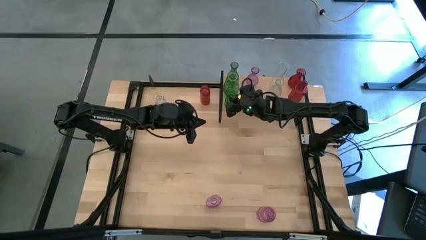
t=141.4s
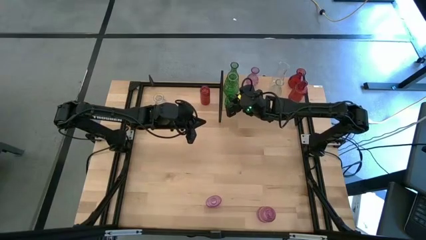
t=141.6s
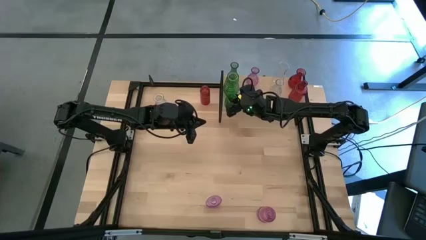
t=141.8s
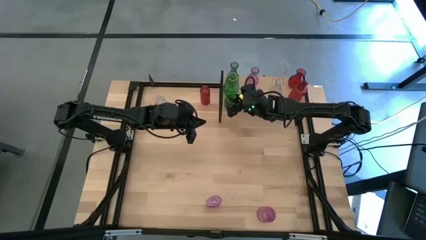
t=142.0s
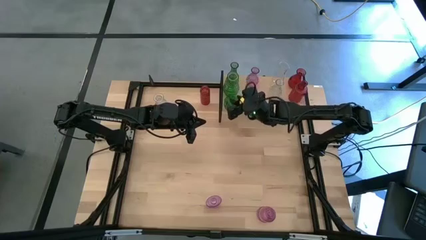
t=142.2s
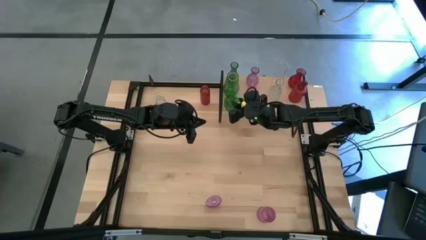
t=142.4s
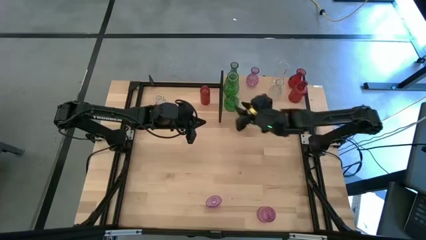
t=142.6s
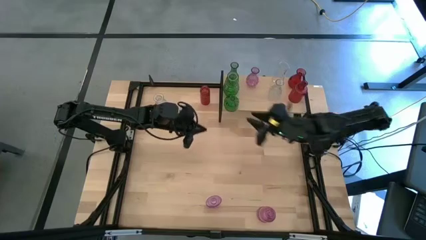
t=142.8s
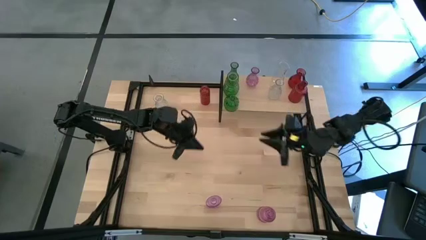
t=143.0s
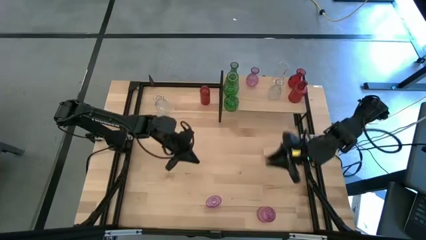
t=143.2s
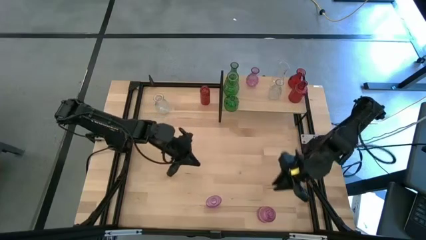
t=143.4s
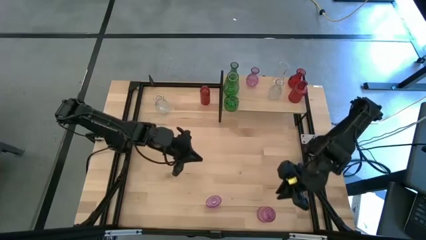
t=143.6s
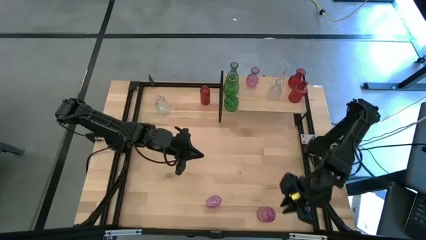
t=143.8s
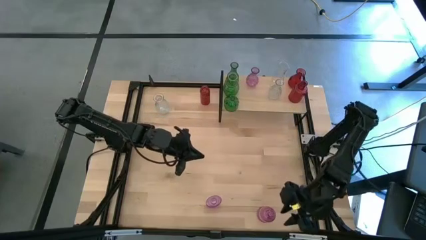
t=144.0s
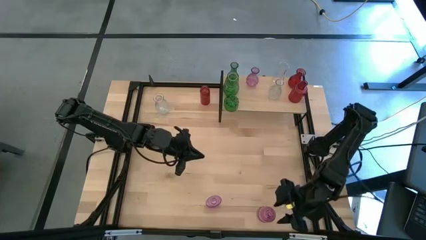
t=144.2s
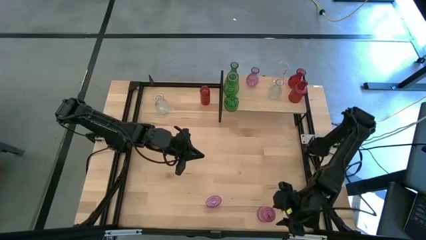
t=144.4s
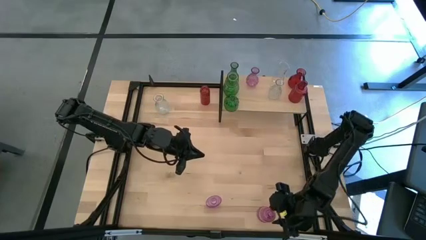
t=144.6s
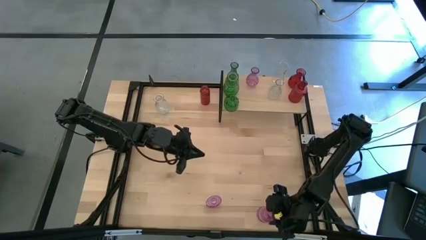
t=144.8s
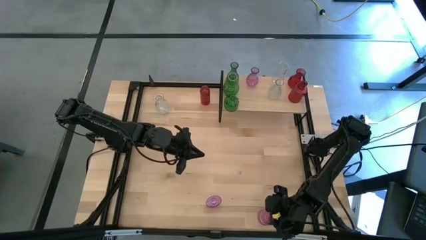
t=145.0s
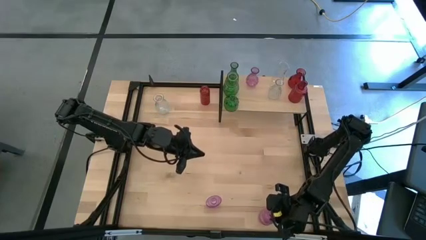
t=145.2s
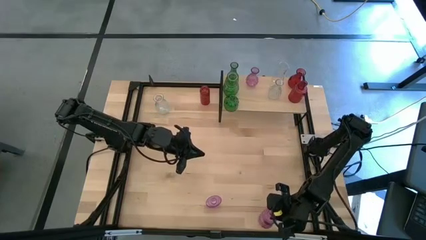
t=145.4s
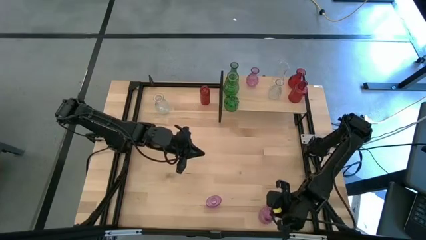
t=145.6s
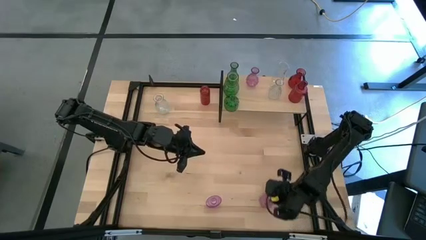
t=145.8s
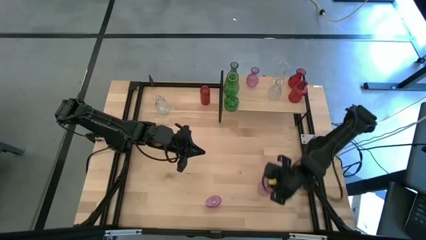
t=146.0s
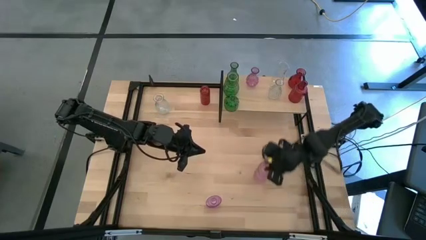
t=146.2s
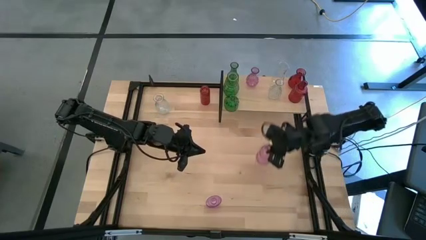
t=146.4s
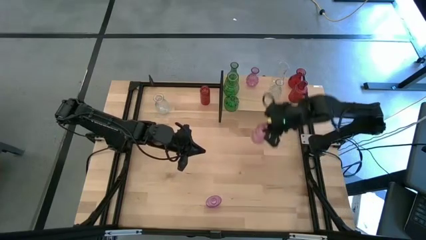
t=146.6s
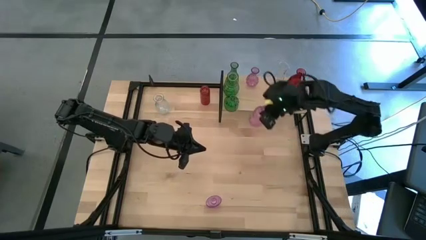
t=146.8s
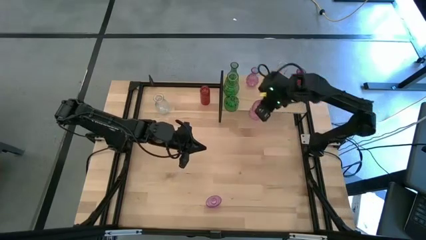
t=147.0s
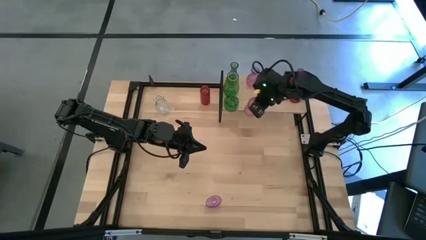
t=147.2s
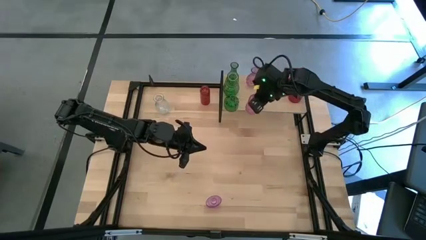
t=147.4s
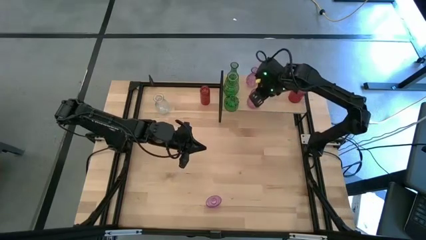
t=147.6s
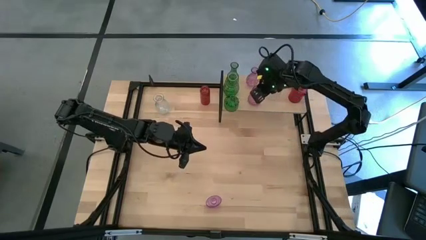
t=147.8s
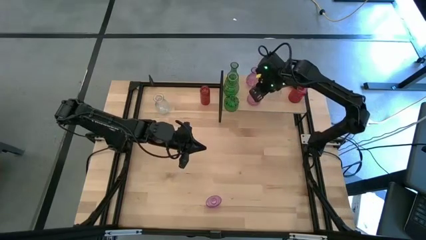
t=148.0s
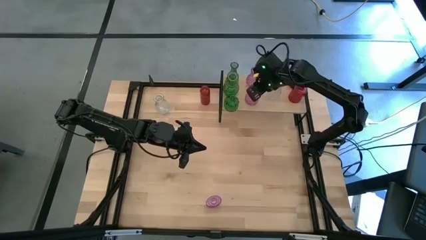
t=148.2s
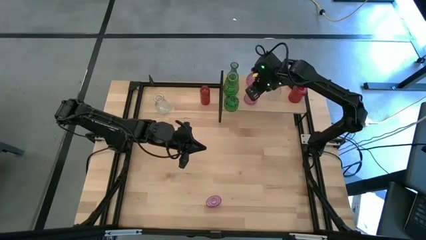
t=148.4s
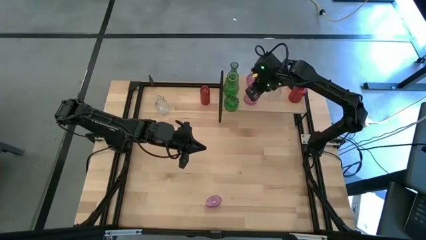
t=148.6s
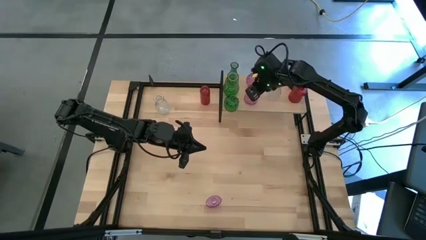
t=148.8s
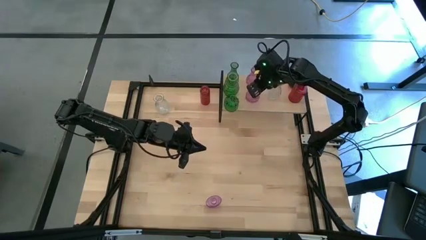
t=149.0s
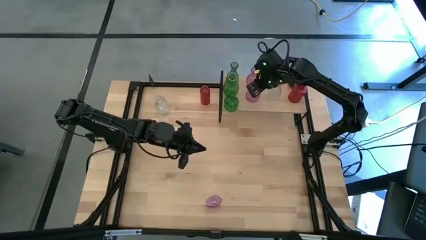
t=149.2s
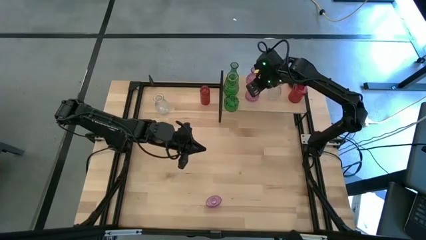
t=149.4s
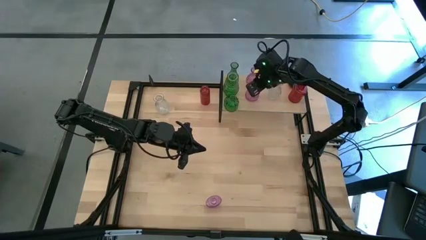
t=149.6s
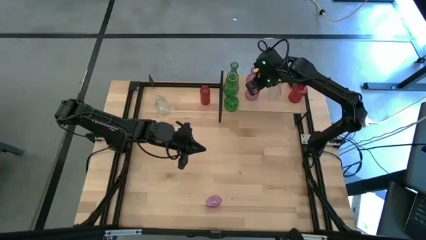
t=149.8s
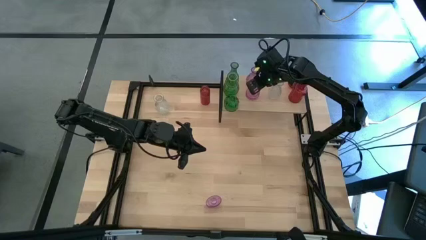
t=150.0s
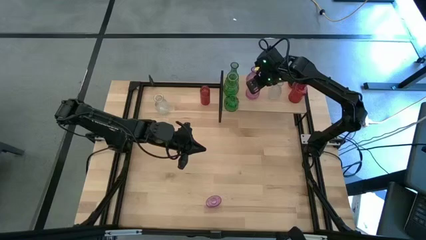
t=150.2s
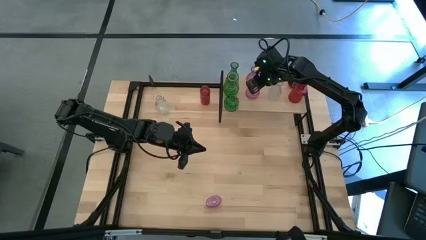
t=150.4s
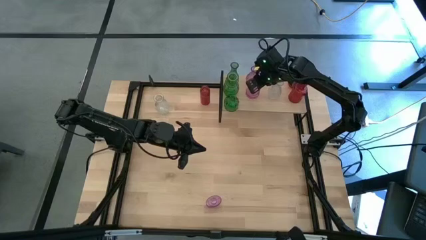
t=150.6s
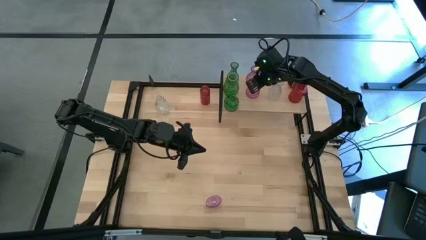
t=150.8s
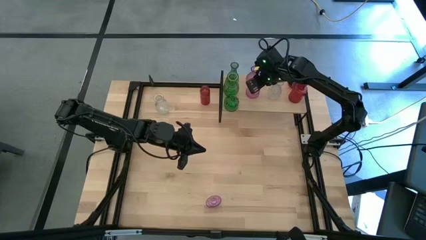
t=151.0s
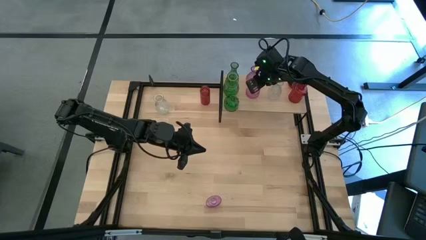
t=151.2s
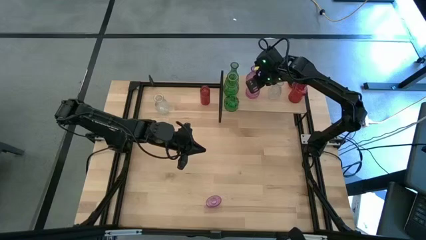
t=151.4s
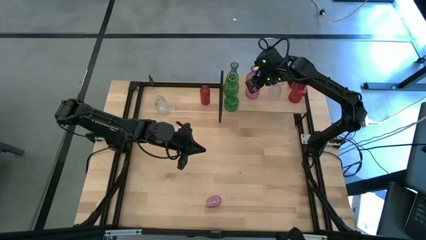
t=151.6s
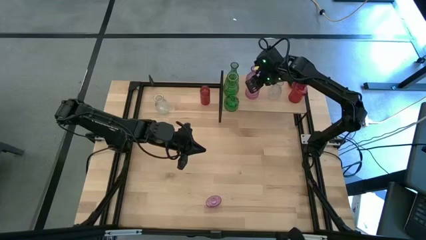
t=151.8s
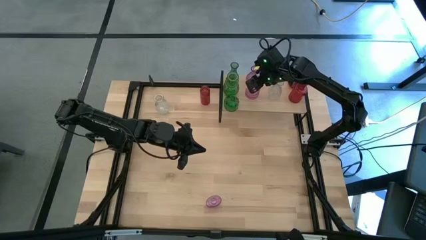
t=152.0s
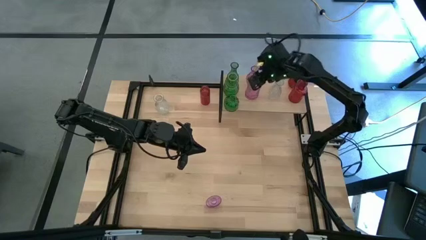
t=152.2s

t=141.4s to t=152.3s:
Task: sort vases onto shelf
Put the right pink vase on the shelf aligned with the other pink vase

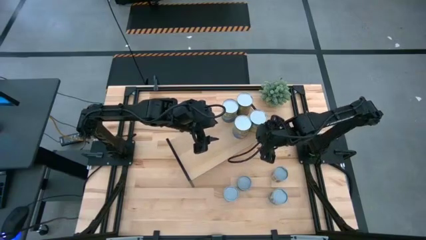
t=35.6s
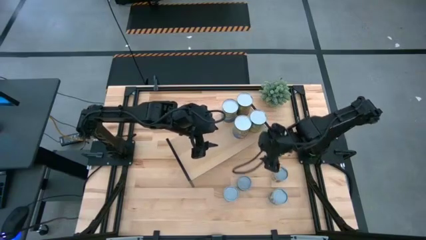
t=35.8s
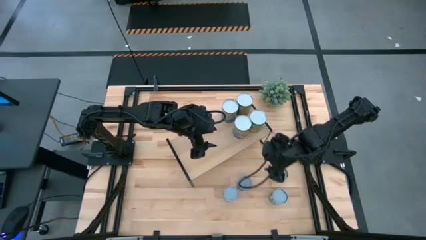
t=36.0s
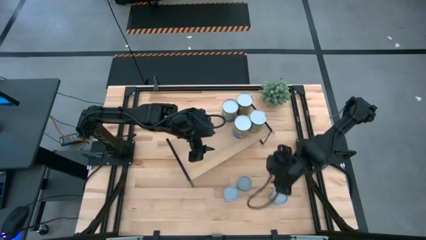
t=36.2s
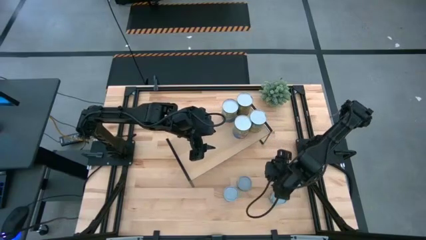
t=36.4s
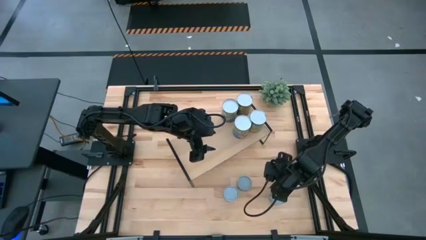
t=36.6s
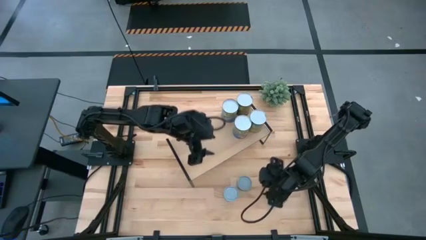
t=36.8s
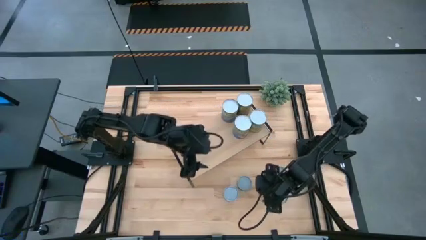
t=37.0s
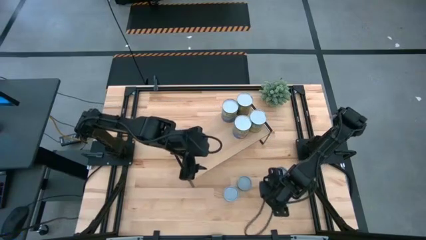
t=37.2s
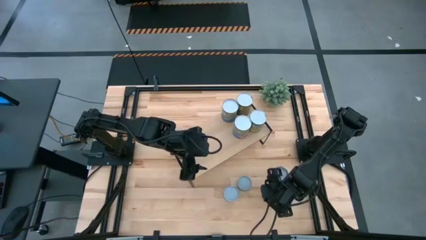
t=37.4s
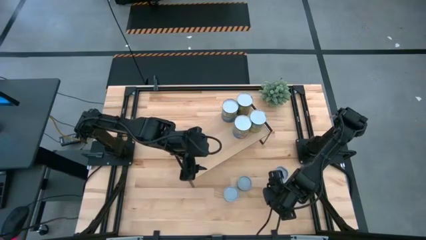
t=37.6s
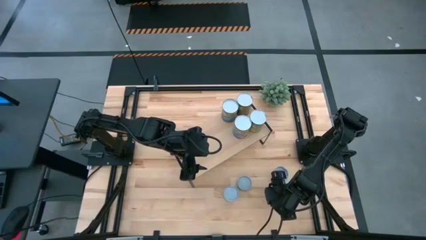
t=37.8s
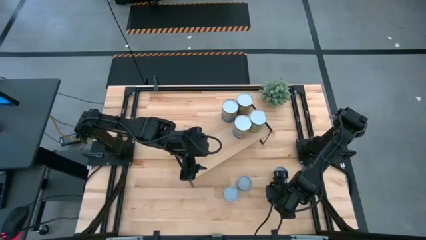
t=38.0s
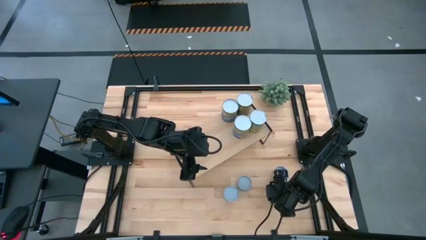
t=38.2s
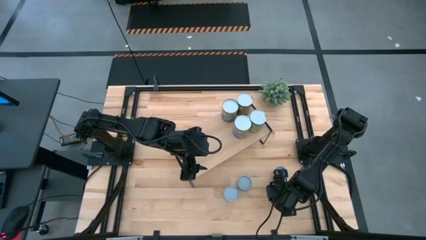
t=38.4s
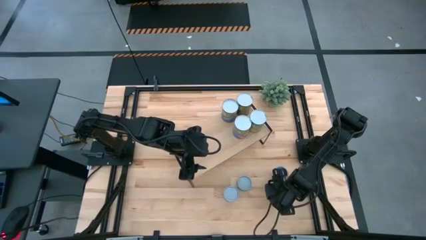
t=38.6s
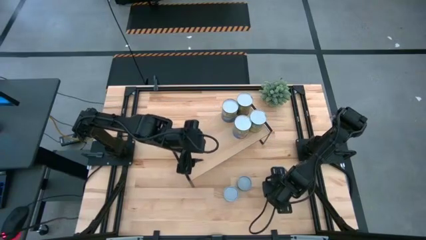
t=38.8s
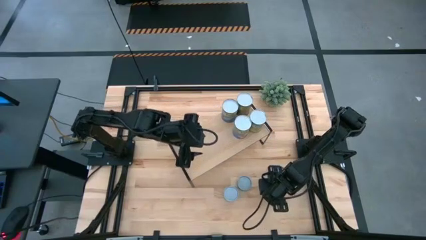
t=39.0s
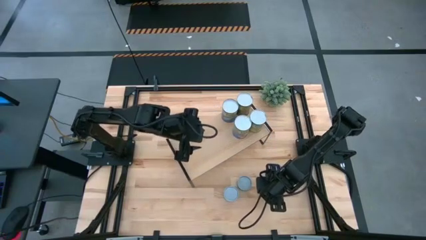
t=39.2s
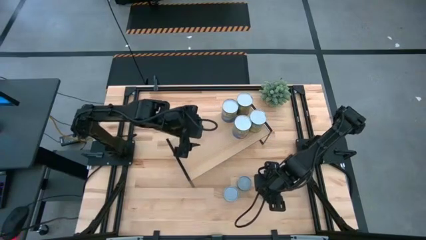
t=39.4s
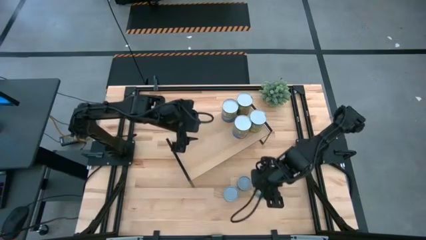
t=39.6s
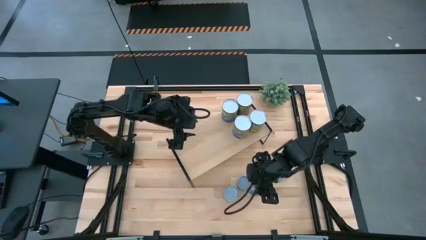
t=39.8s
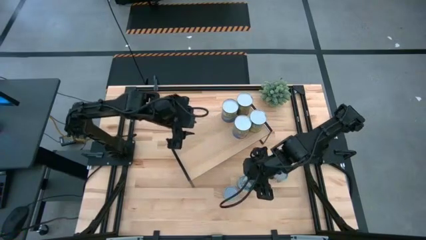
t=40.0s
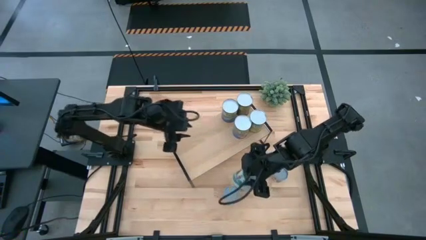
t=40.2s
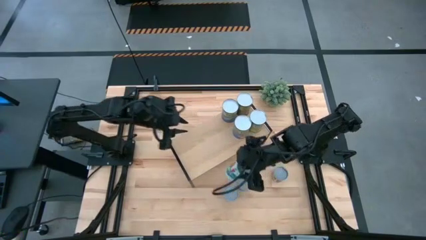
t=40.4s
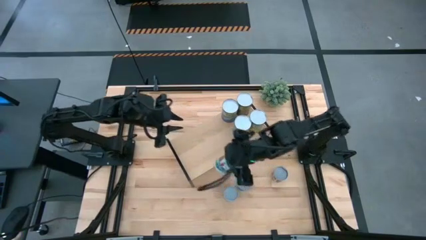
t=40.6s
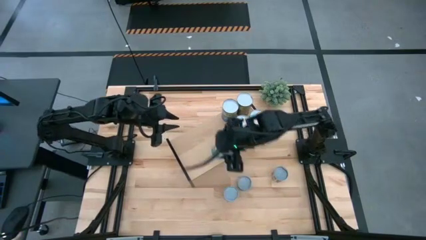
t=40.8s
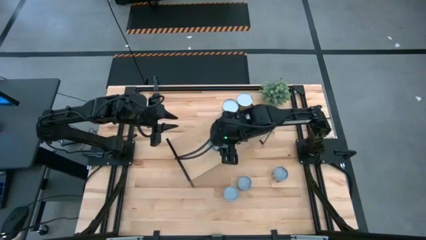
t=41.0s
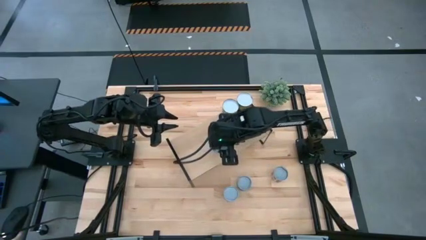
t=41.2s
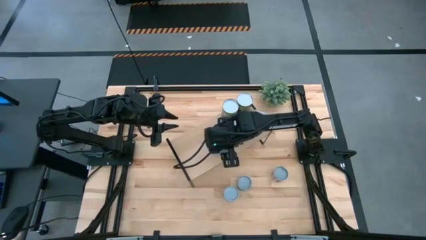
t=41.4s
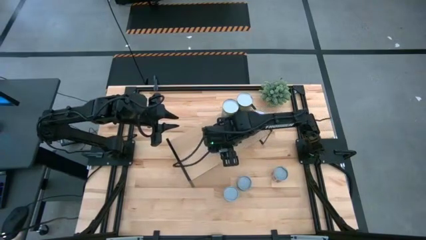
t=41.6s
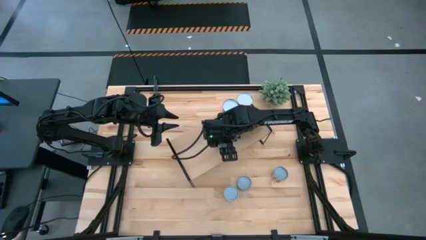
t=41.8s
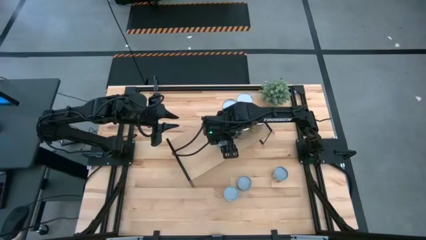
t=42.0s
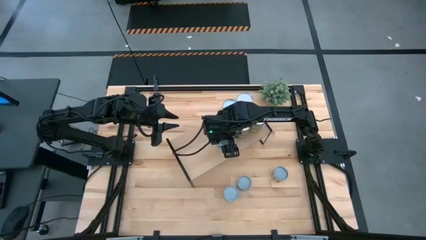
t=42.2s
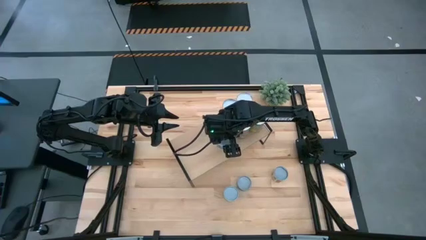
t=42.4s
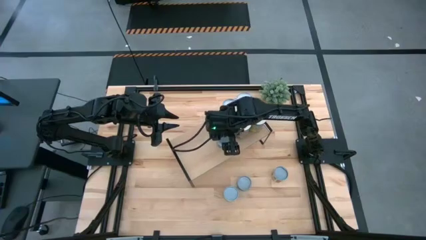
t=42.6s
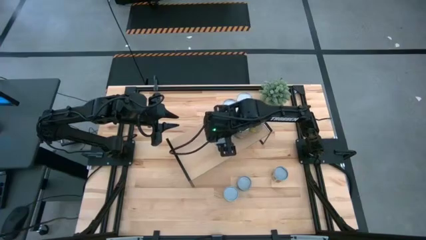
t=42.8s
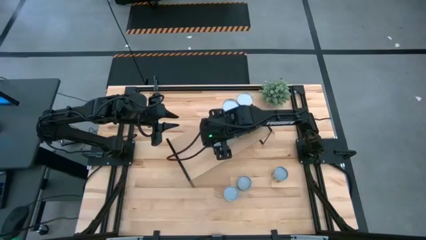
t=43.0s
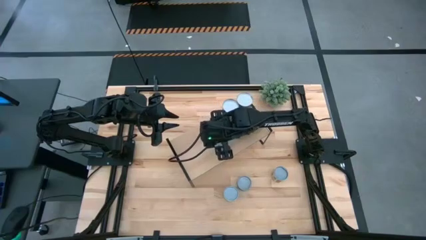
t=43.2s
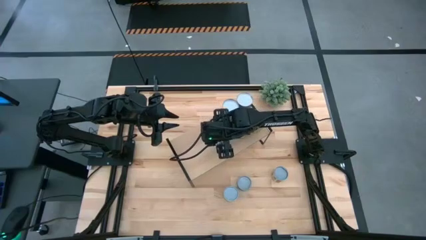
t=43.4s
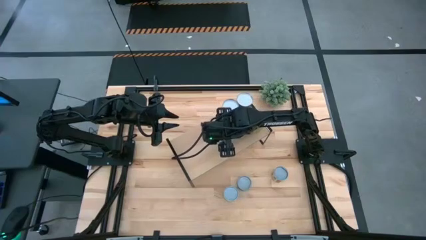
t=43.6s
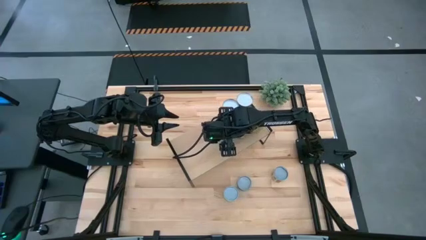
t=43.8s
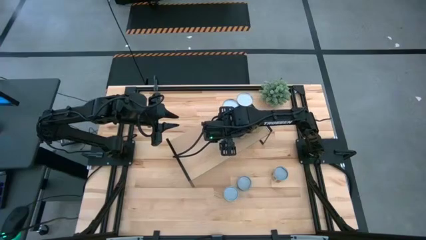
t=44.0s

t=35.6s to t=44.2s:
Task: Pick and place cans onto a shelf
Put the big canned mixed vegetables on the shelf
